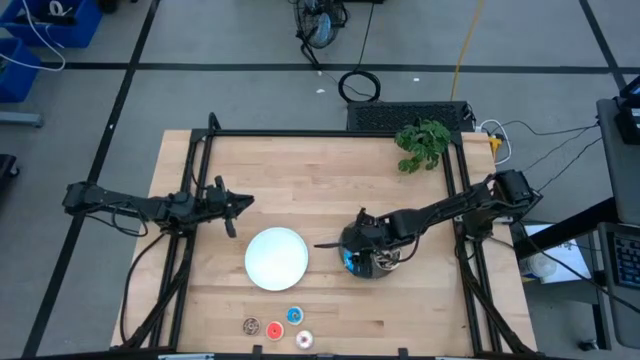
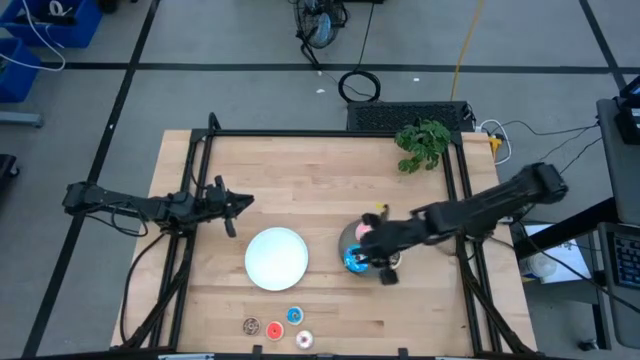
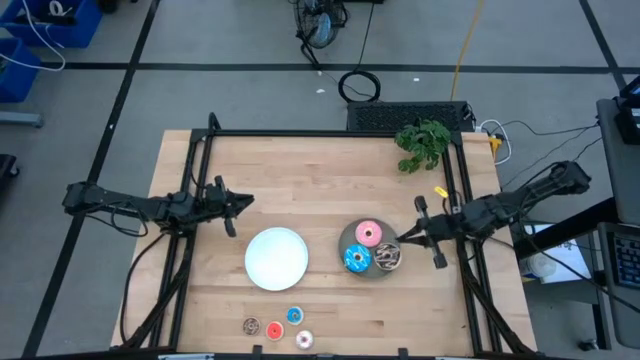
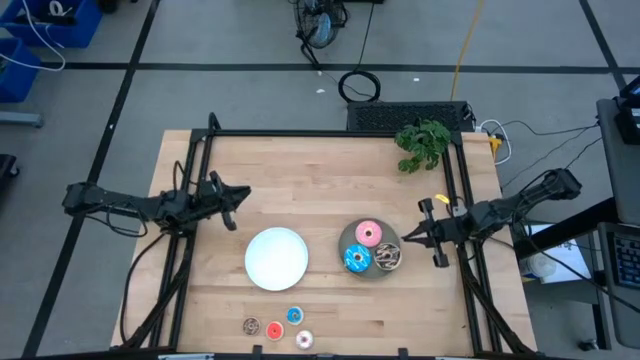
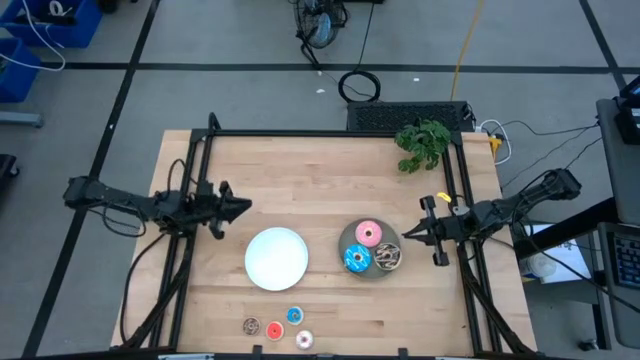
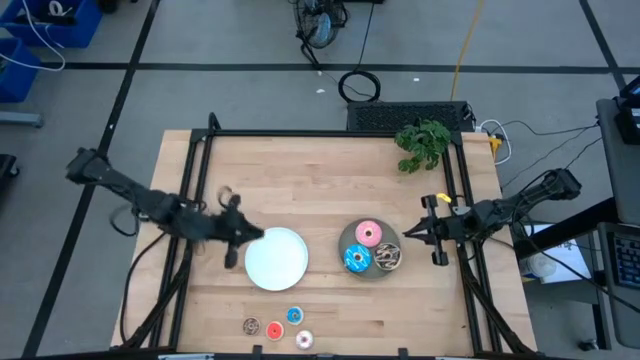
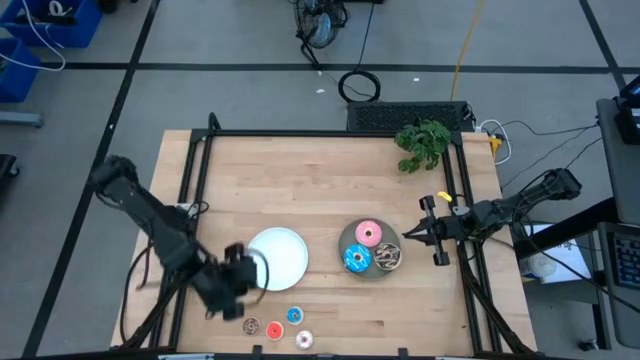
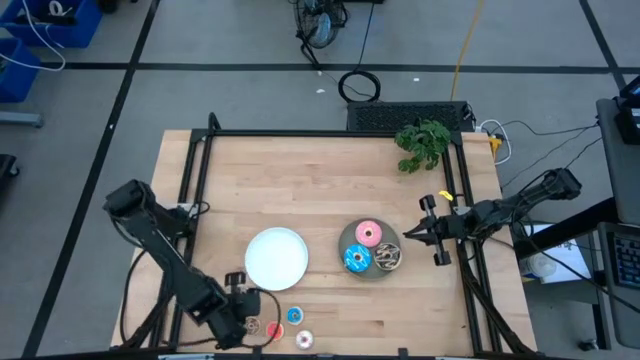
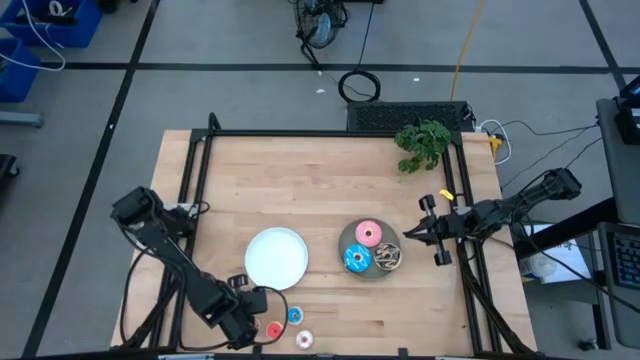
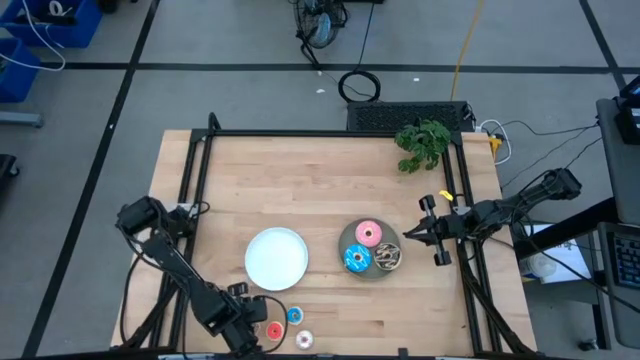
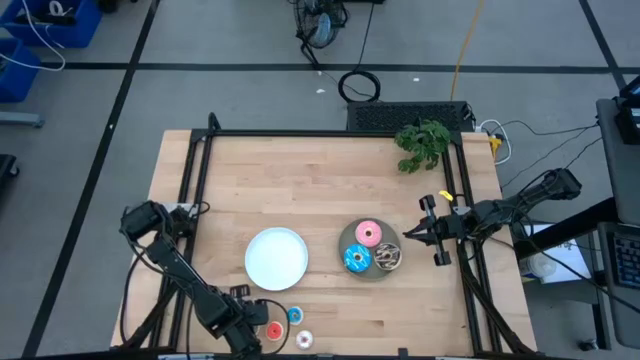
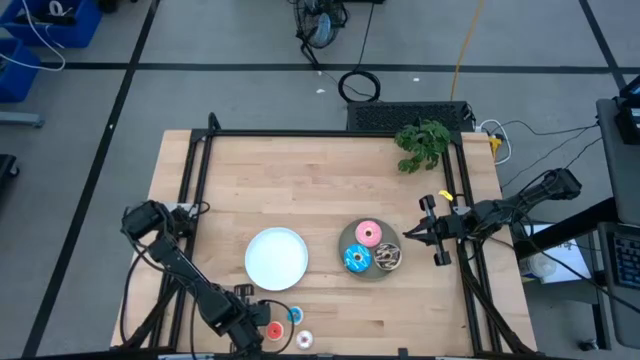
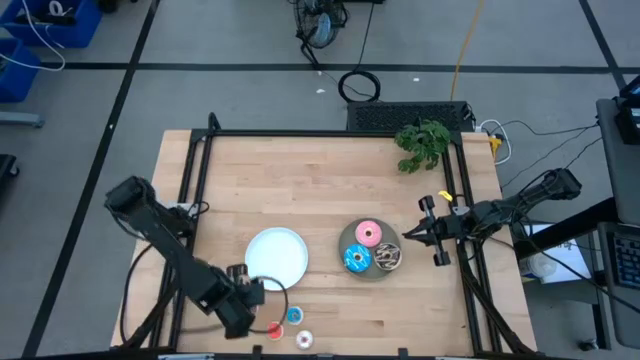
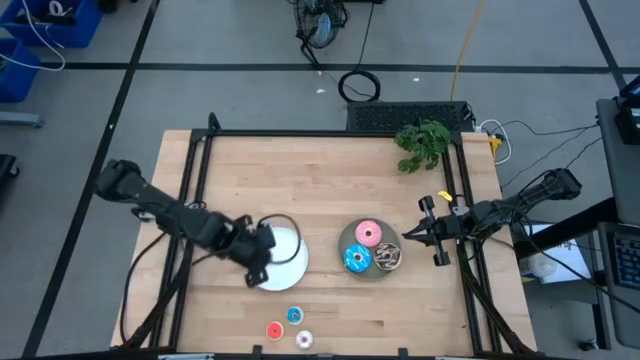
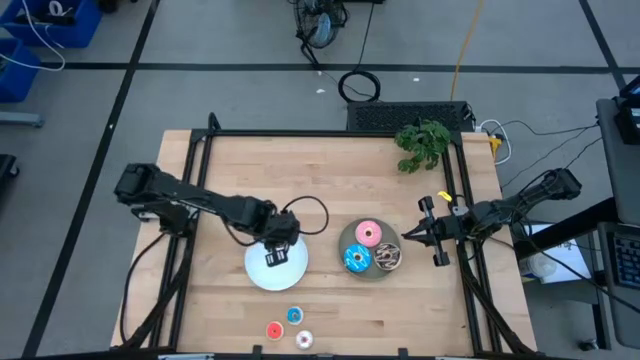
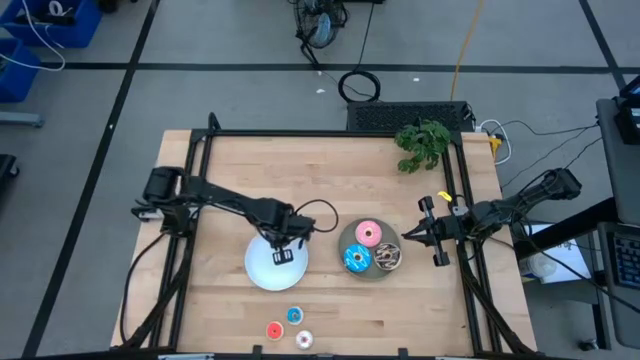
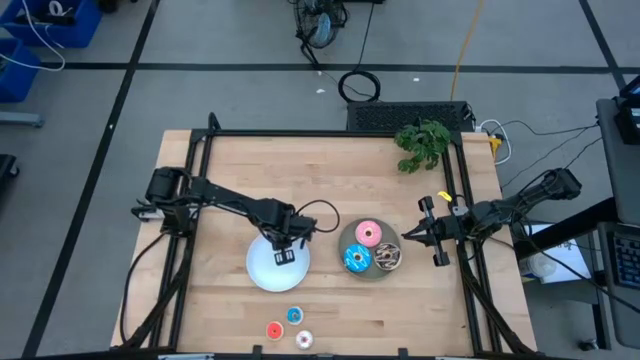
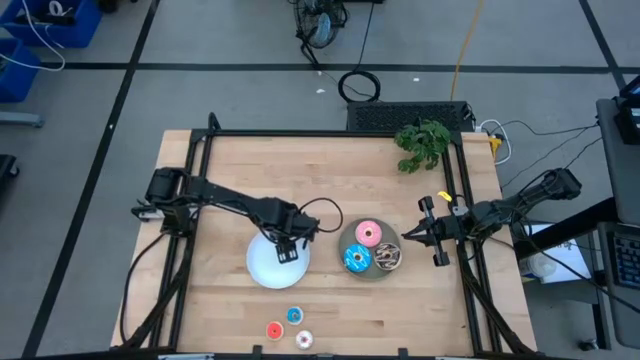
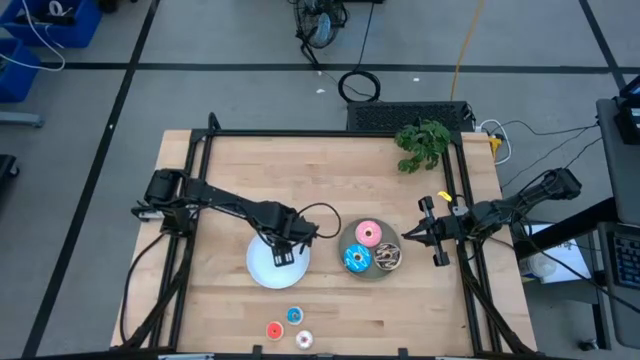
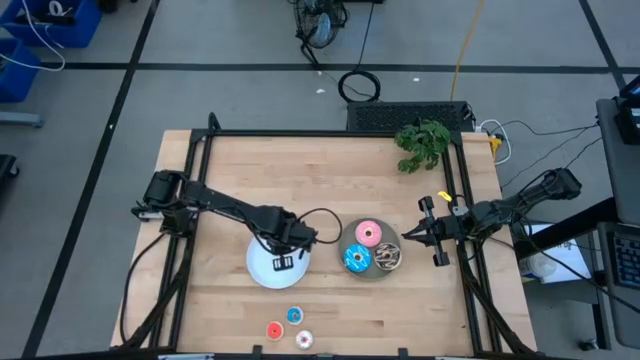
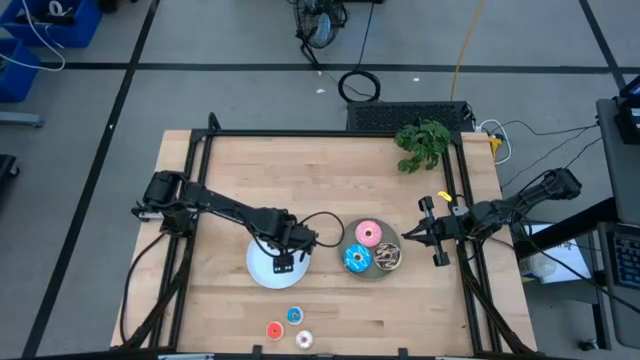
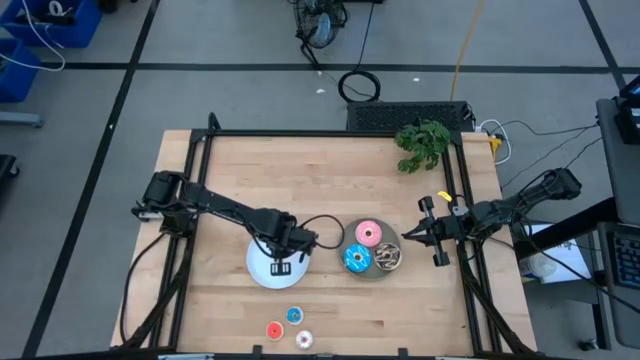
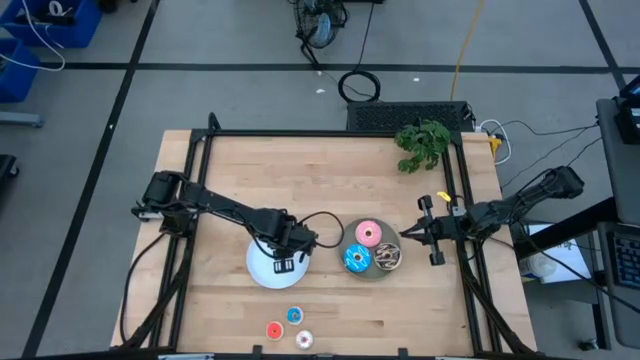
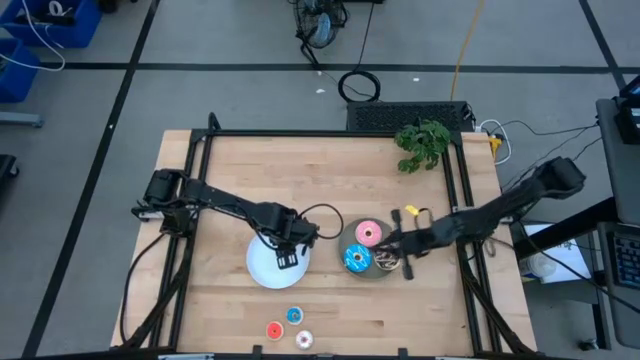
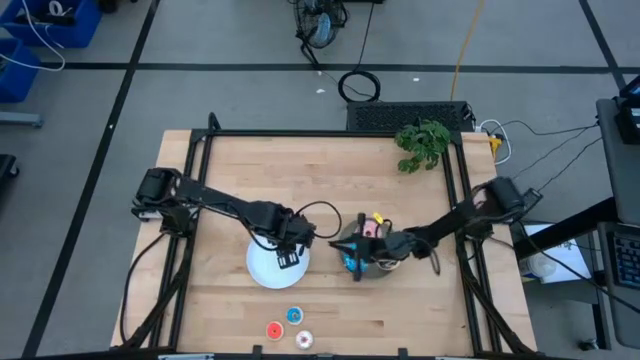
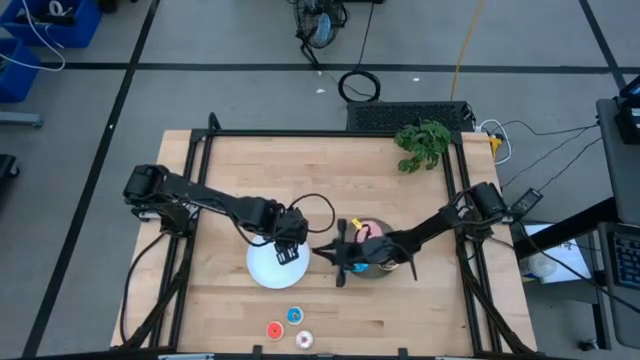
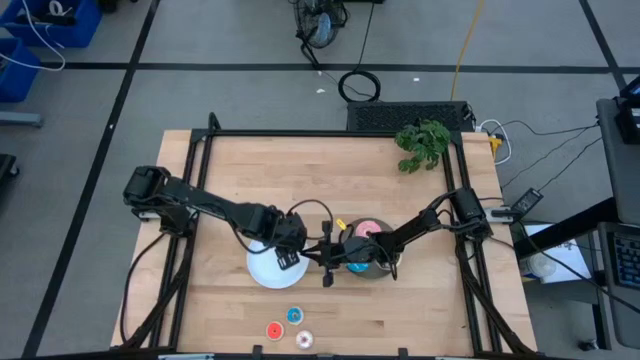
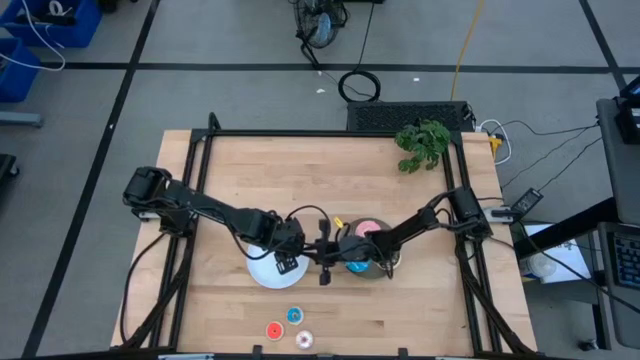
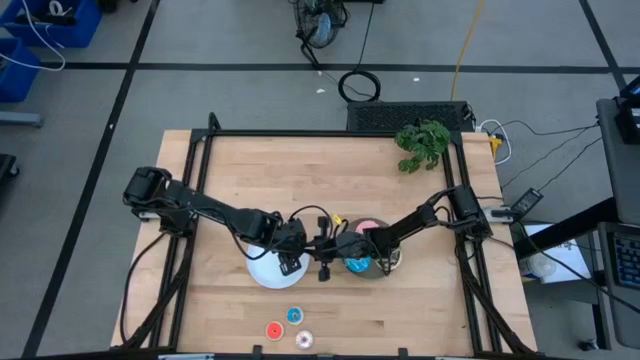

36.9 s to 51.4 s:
Task: Pick & Place donuts
Put the small brown donut on the white plate

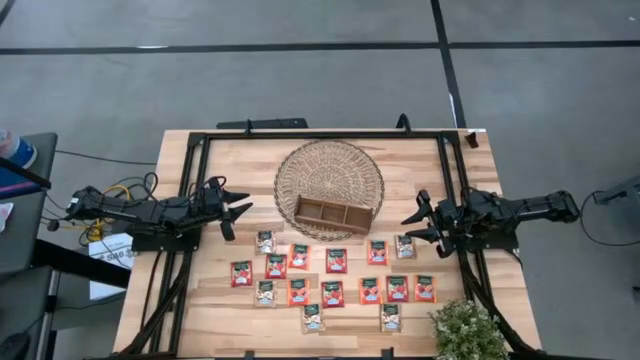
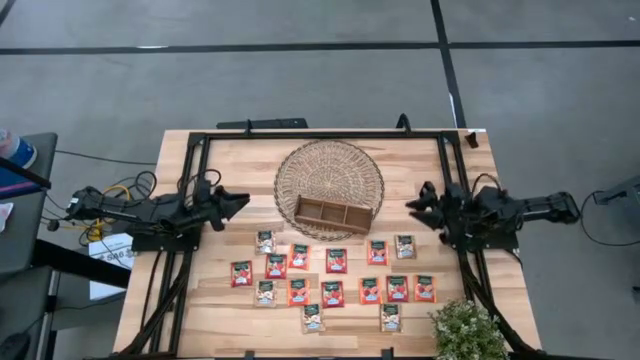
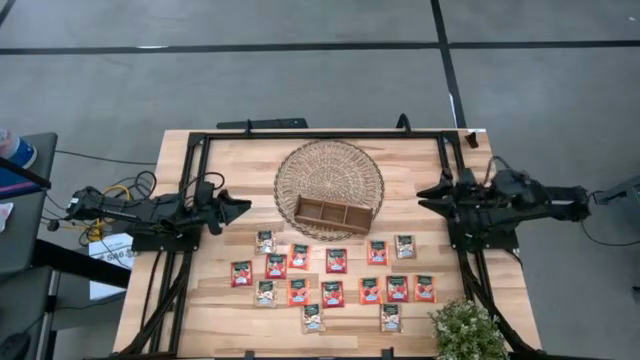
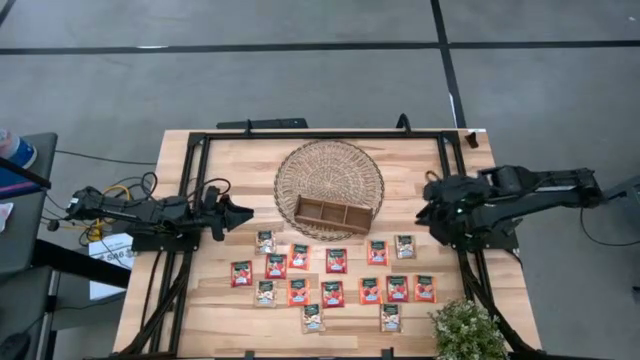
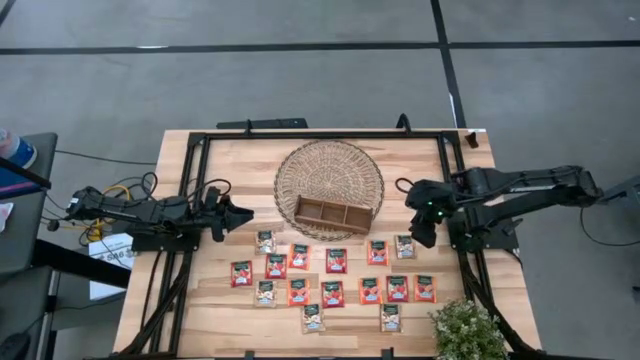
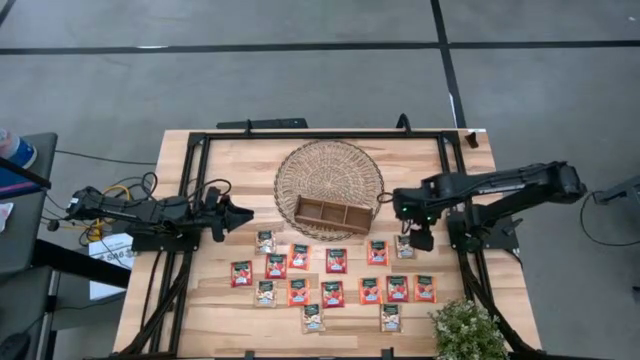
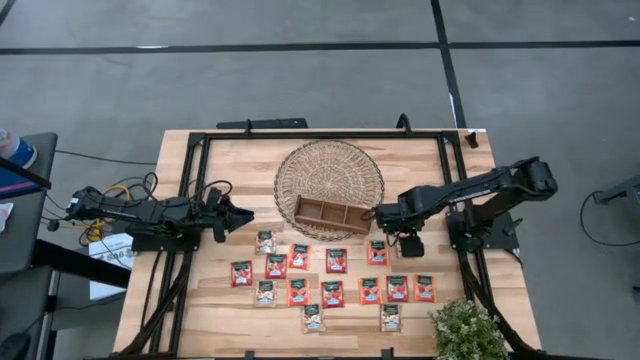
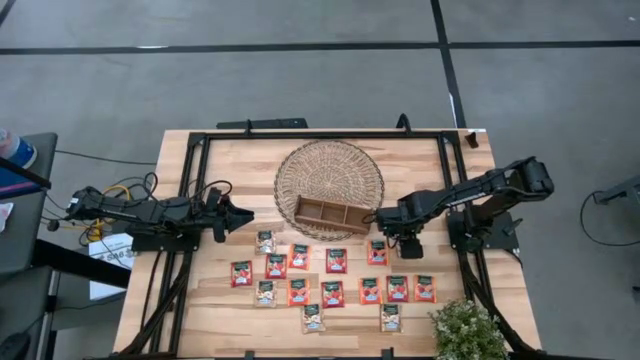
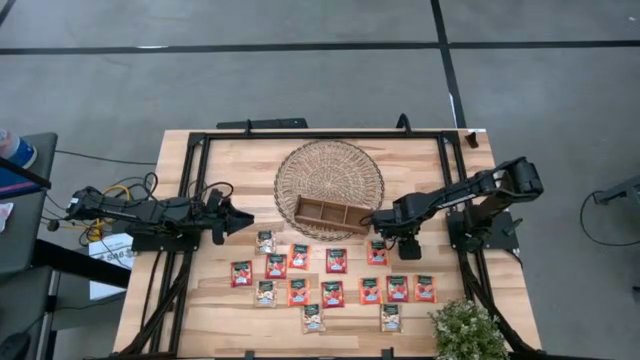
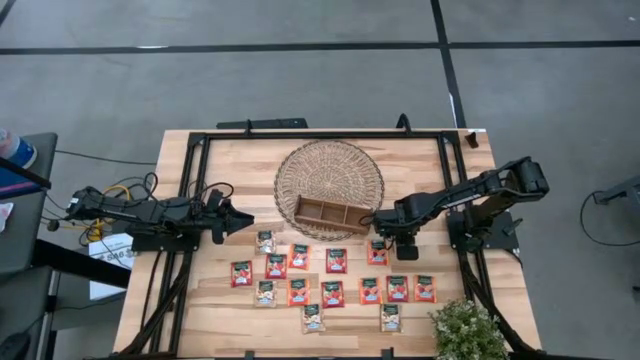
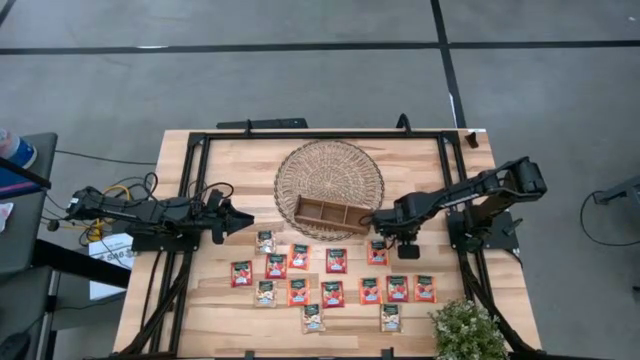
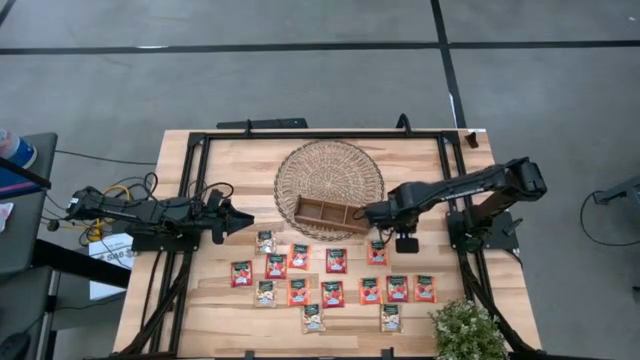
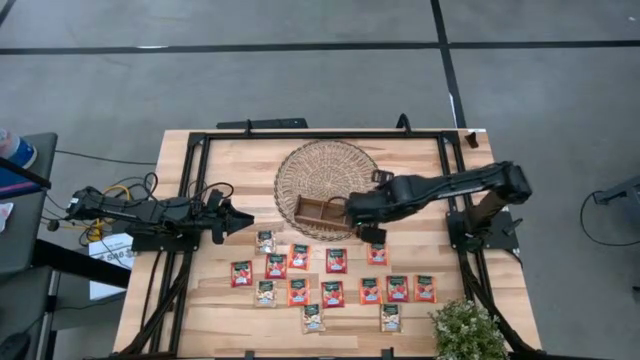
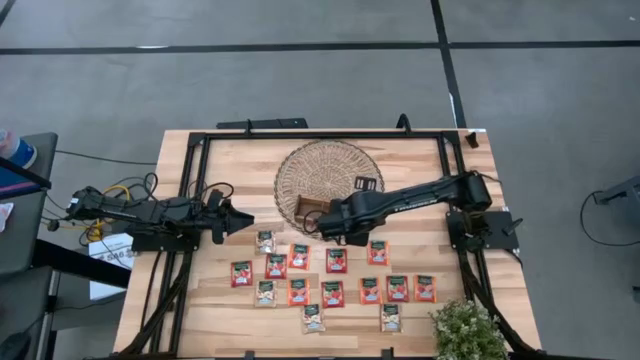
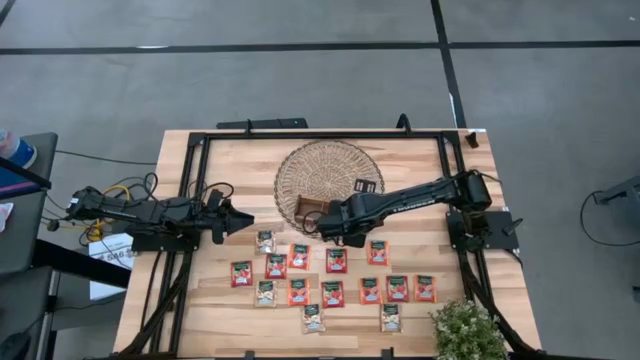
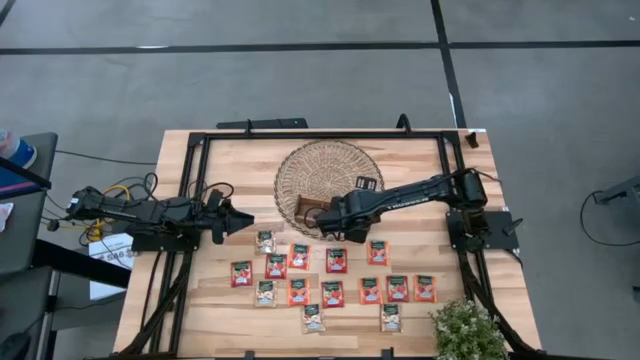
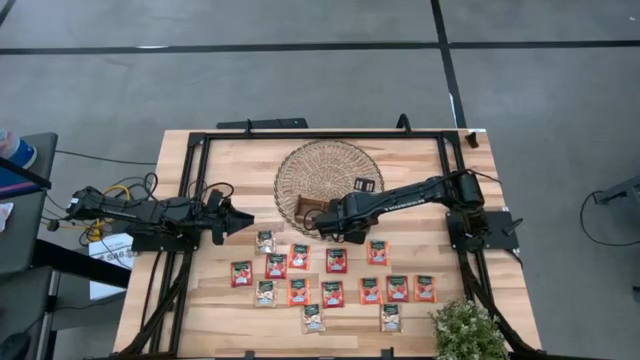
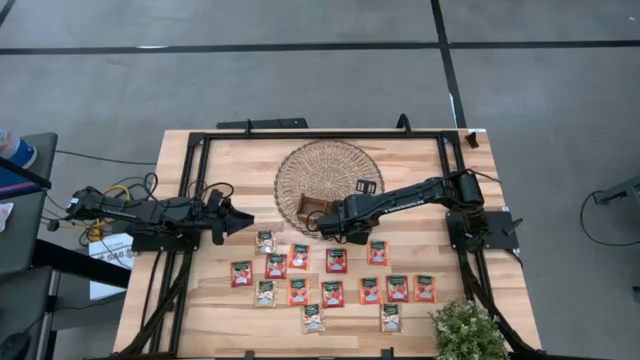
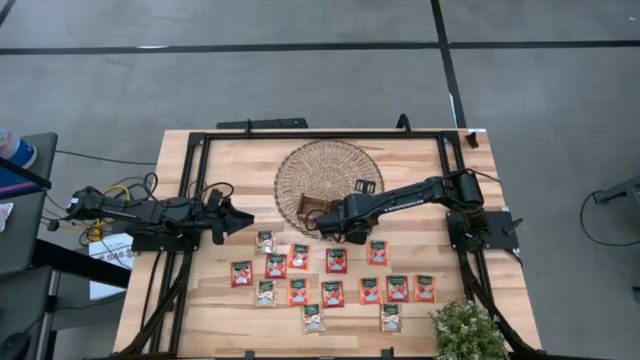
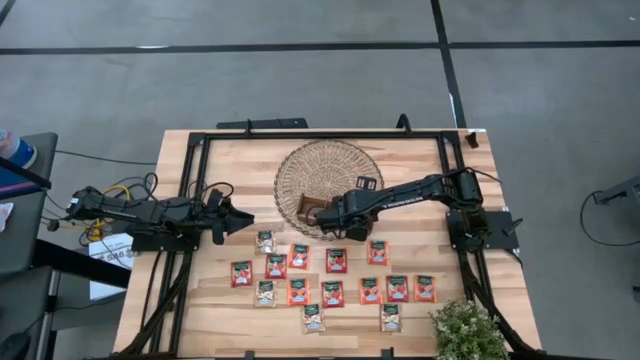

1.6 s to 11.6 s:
Task: Pick & Place Tea
Put the brown tea bag into the right section of the wooden organizer
